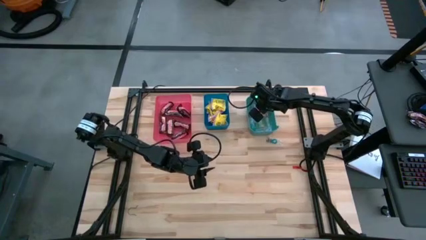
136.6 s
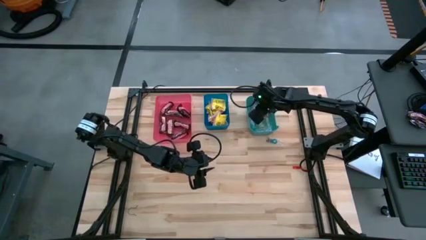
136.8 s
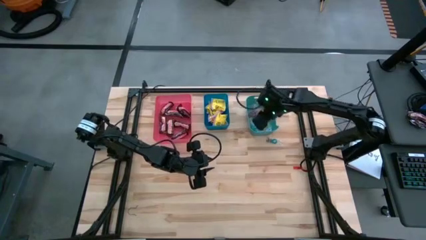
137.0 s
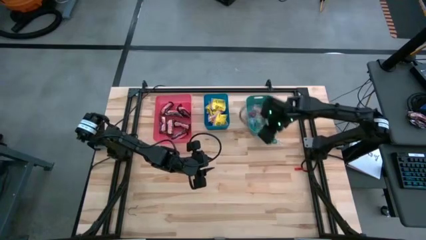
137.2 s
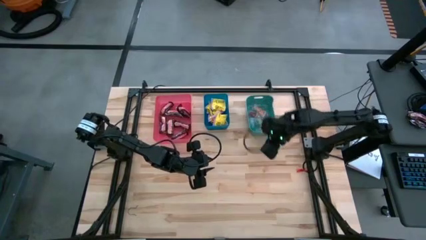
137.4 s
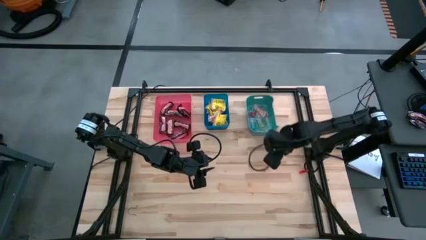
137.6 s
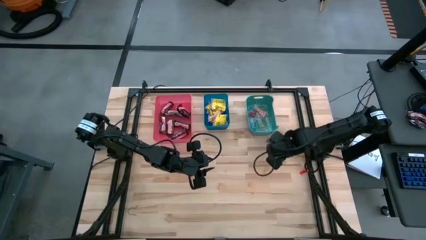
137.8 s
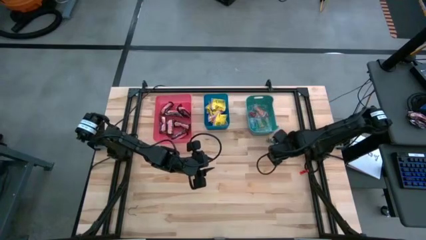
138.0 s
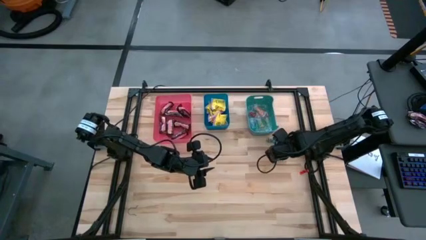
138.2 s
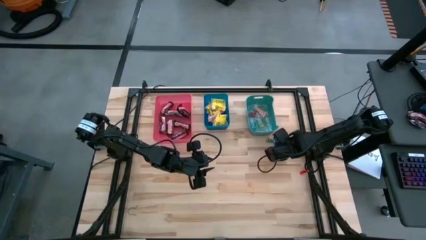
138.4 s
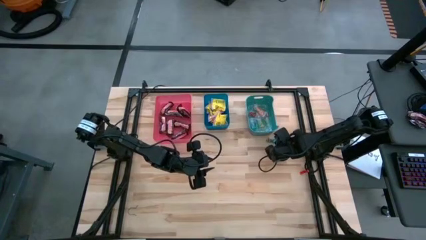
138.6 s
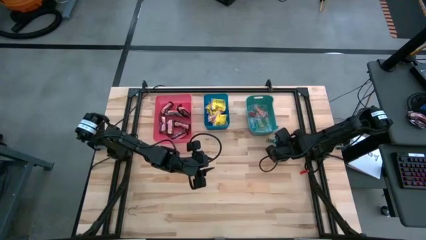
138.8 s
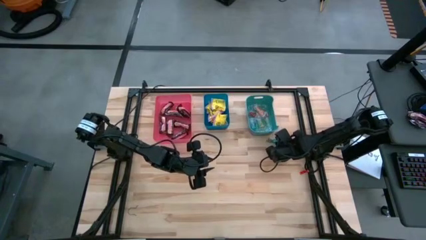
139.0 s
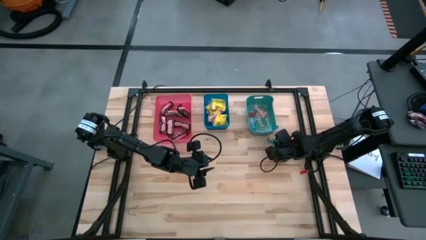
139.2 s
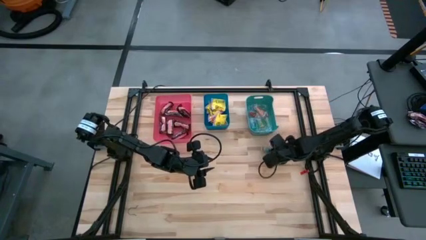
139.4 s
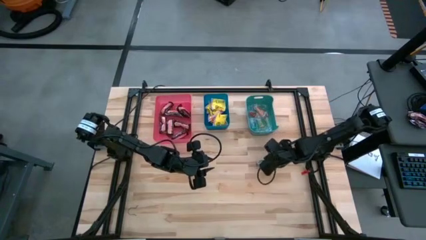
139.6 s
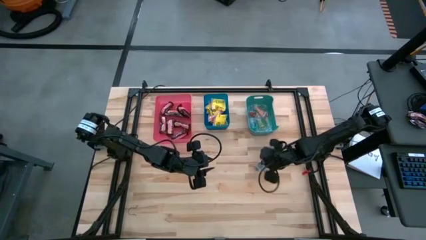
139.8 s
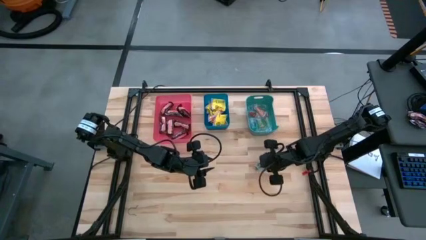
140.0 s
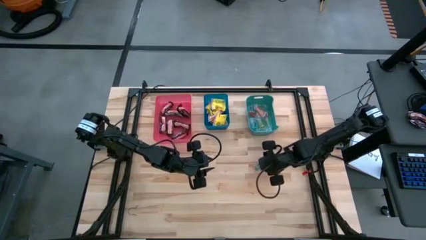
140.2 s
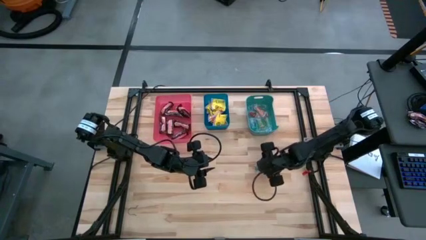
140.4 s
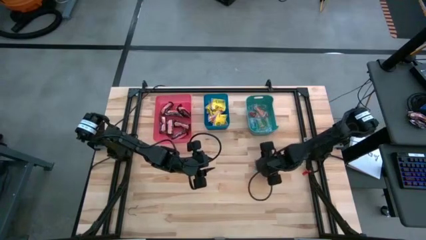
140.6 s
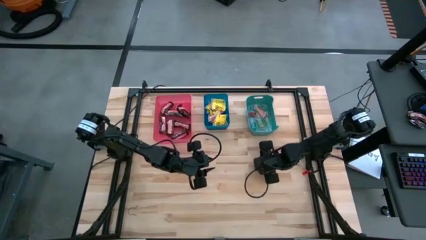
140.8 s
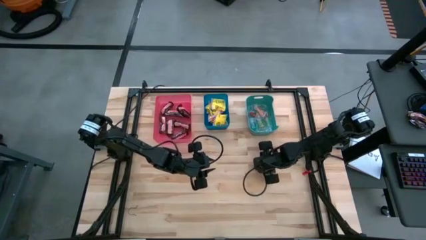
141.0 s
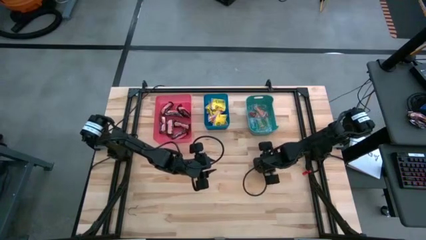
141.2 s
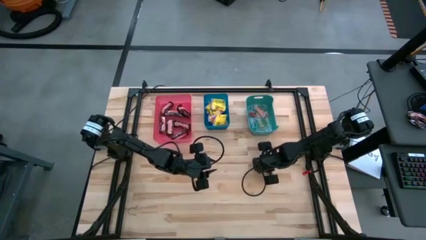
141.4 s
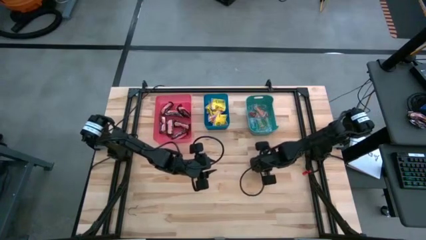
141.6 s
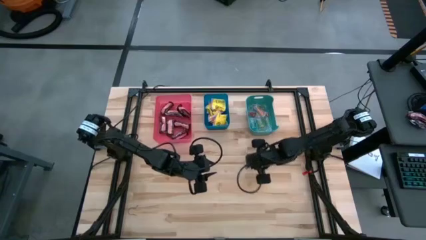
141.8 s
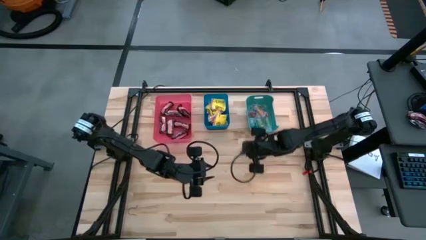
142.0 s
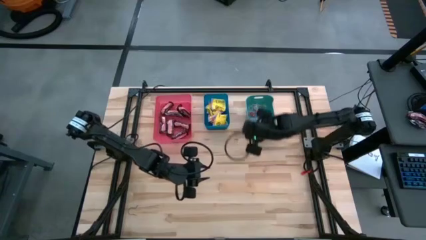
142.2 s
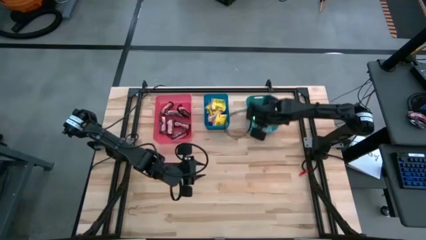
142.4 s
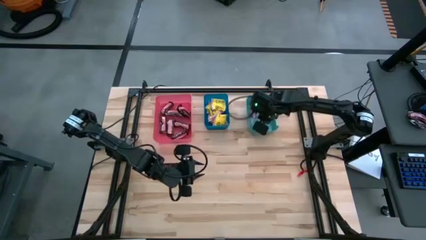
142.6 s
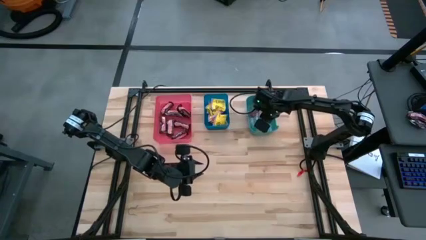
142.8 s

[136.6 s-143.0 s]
Task: Sort candy
Put the blue gummy candy into the green bin

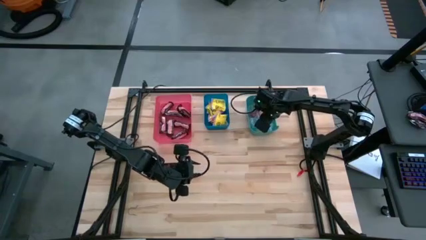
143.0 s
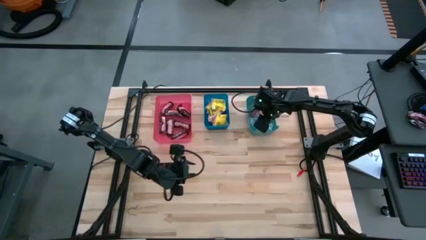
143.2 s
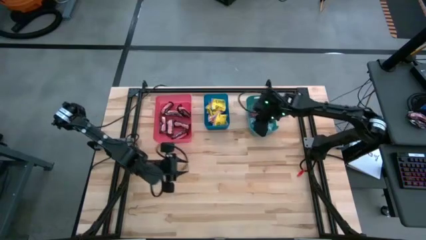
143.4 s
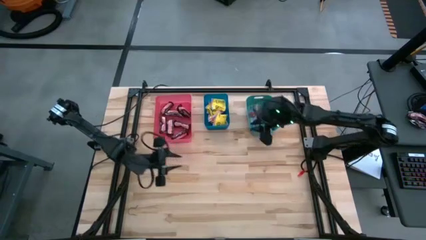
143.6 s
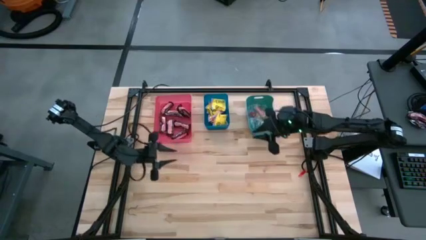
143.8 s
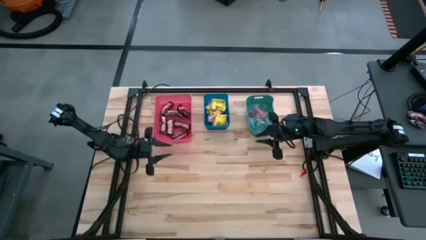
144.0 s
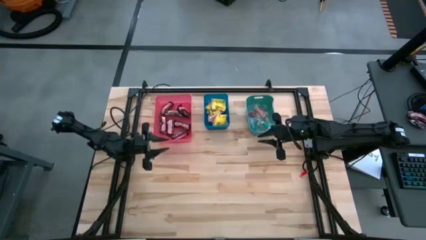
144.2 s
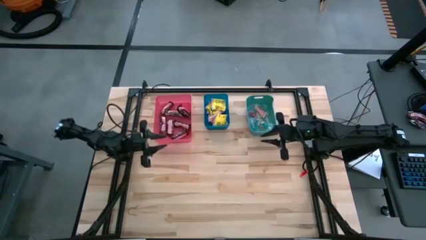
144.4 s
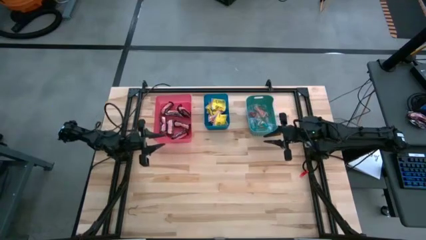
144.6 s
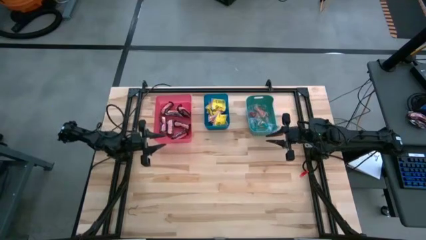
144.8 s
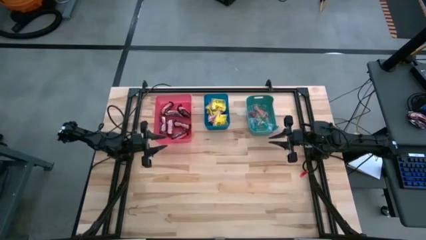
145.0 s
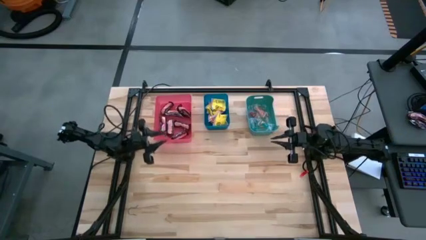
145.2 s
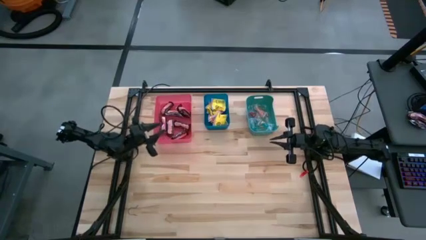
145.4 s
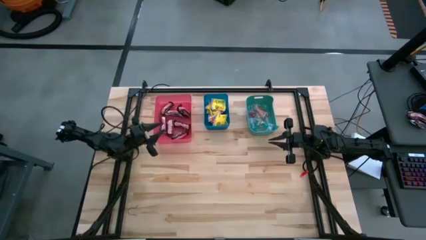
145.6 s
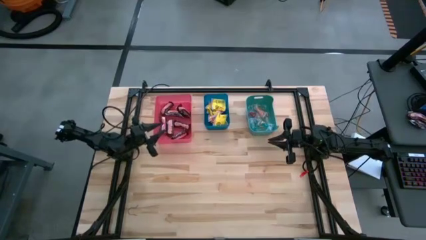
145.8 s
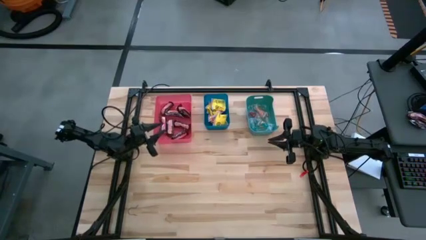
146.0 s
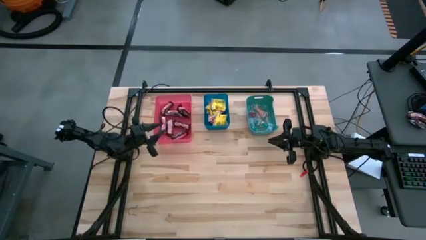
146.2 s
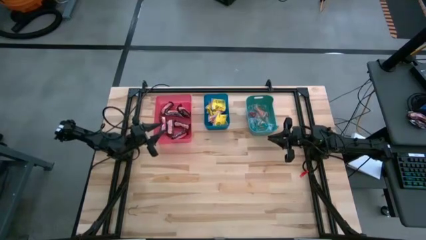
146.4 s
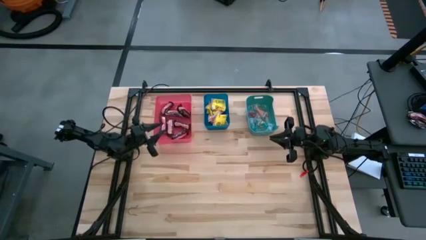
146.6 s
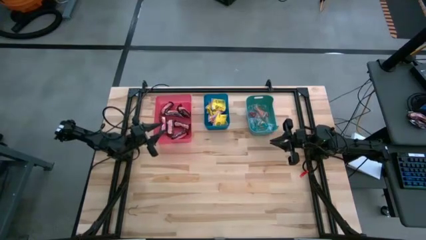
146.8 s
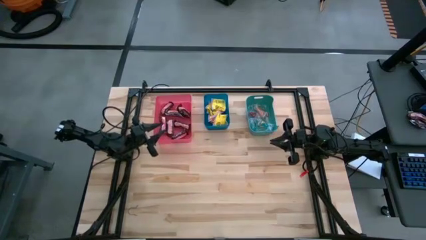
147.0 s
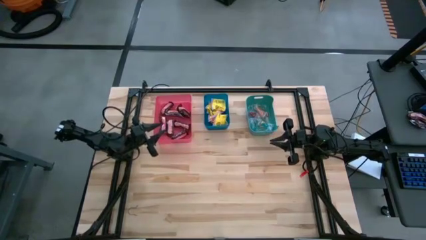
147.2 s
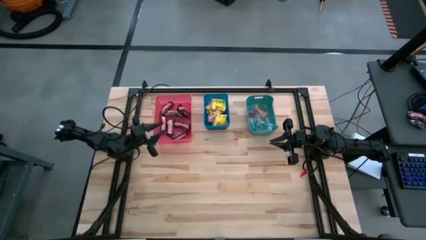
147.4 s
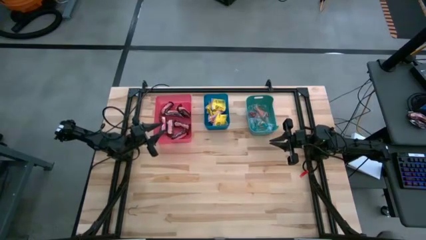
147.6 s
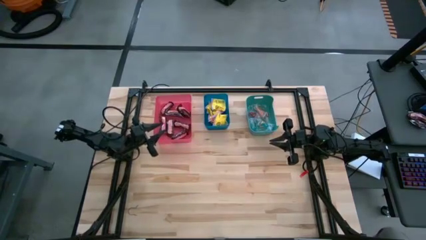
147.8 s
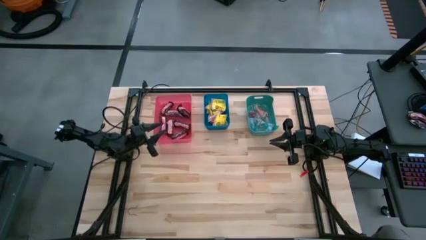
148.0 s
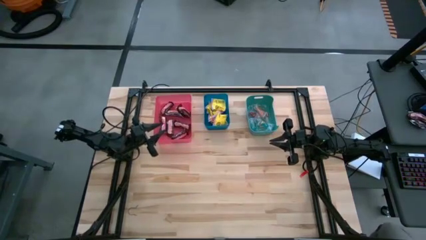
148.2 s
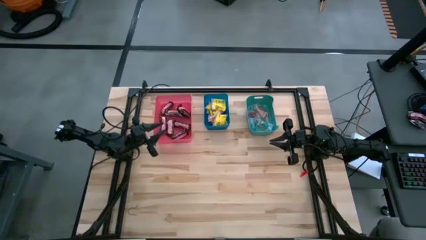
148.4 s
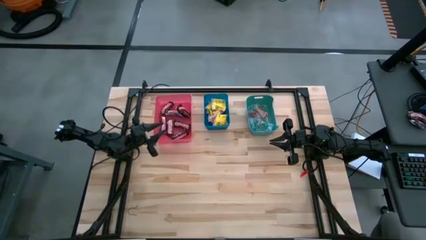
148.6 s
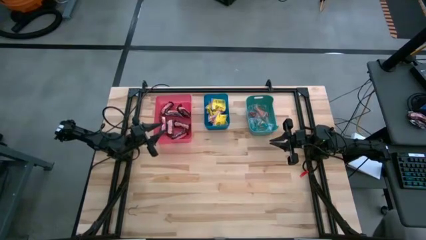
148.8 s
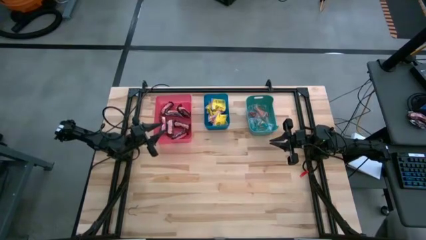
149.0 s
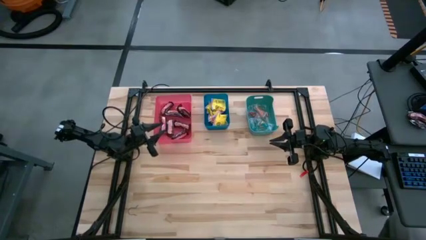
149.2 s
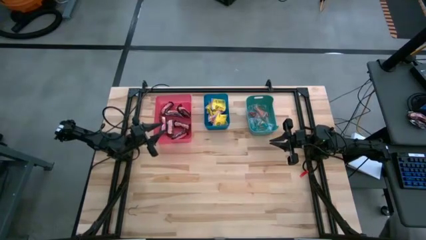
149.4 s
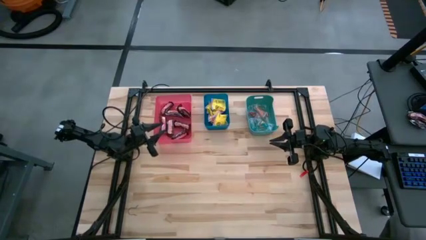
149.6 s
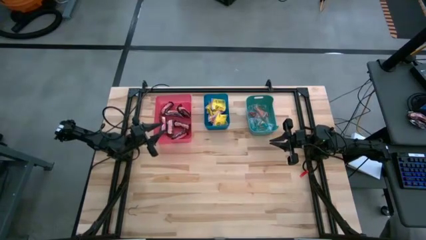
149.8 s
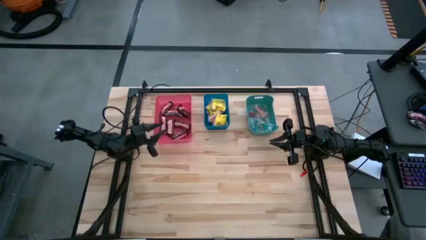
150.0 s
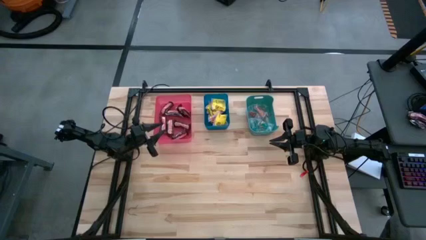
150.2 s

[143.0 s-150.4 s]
Return to Home Position

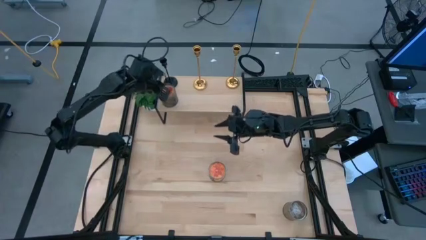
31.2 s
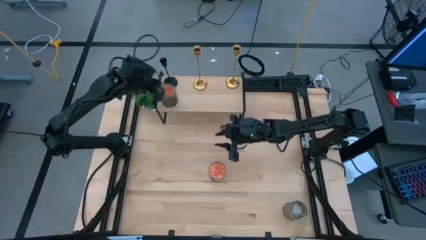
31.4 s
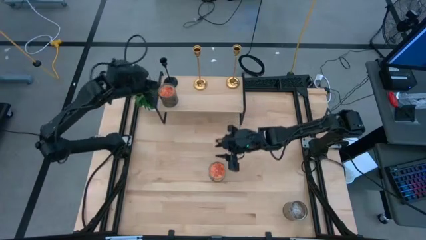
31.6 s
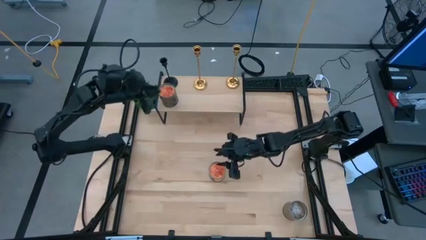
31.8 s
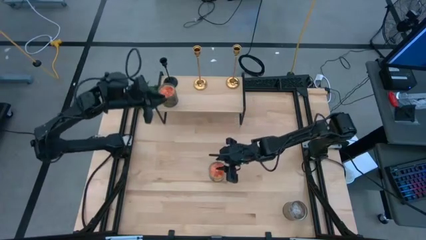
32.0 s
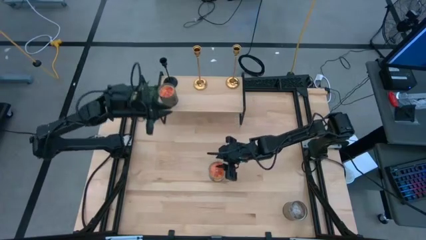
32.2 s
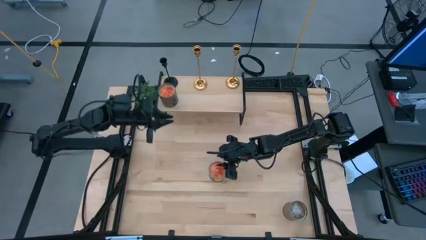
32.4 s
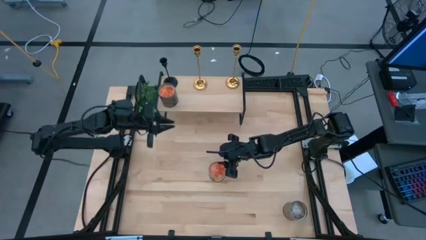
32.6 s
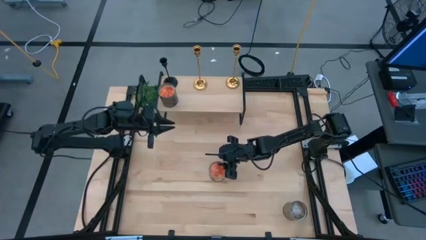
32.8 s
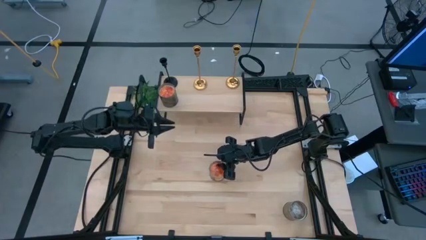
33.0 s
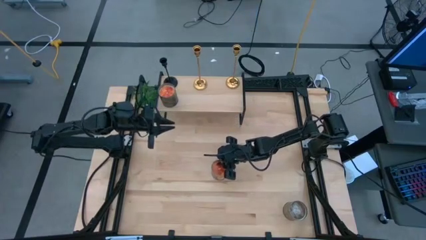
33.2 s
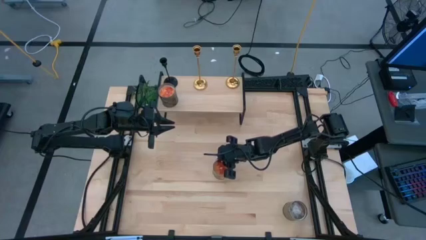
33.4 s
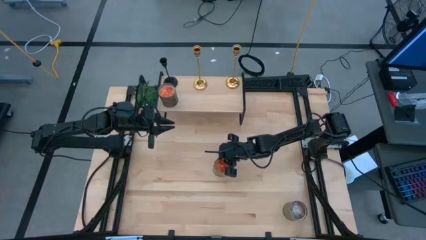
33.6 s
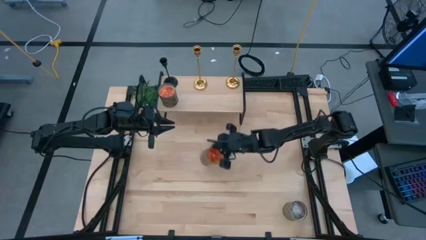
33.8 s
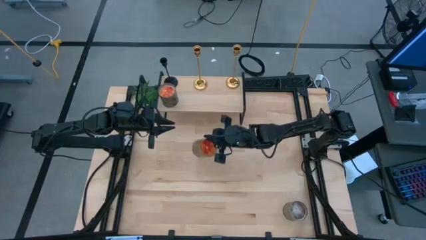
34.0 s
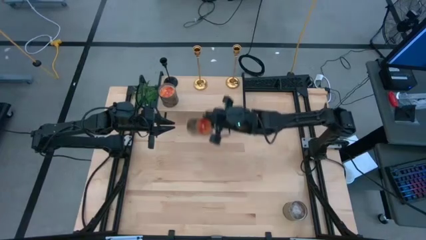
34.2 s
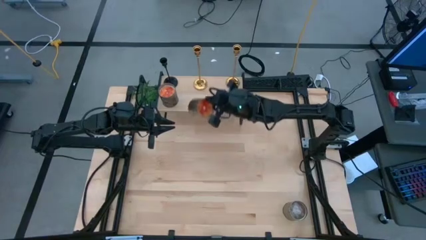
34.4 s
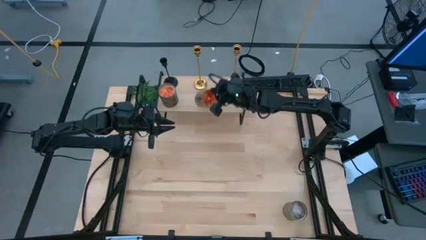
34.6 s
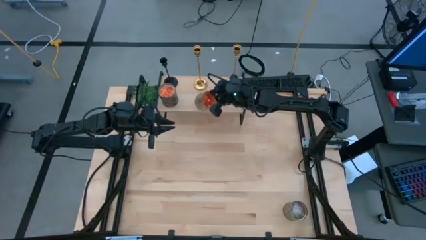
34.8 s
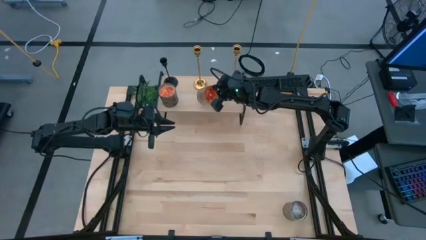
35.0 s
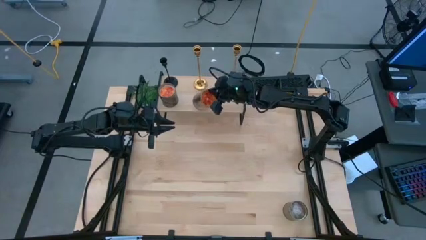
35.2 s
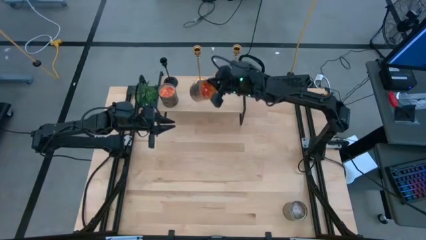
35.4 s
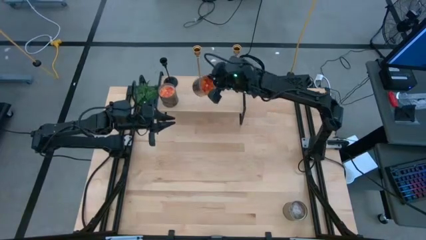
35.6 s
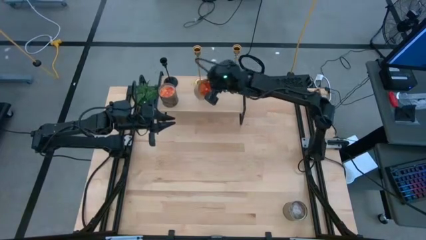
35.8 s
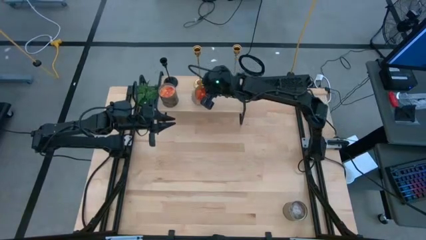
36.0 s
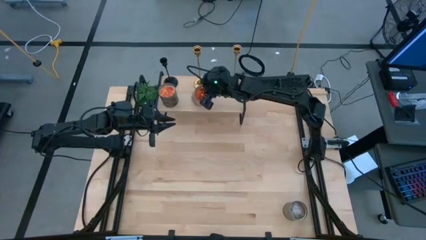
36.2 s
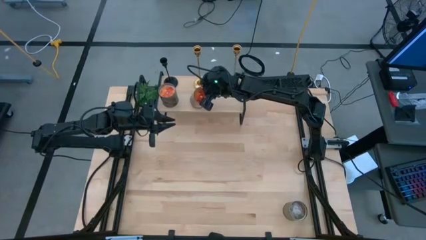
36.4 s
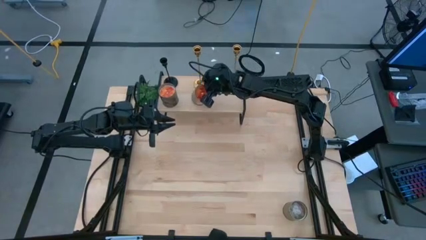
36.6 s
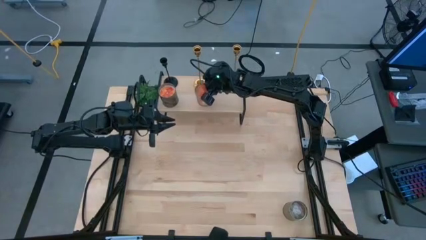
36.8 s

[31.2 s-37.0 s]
Task: Pick & Place candle stick holders
Put the left scented candle on the shelf
